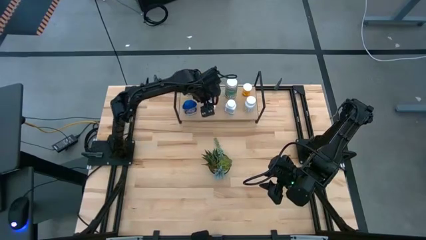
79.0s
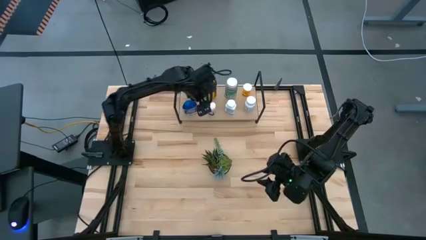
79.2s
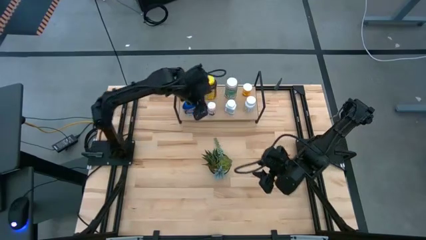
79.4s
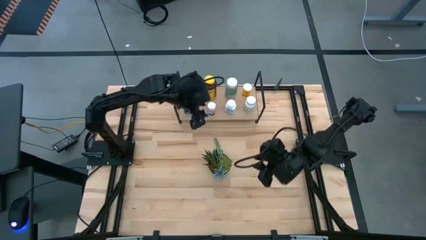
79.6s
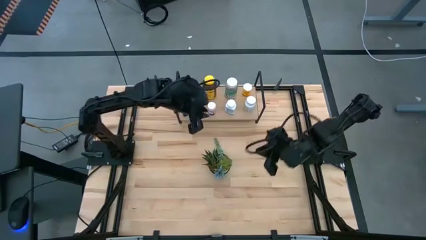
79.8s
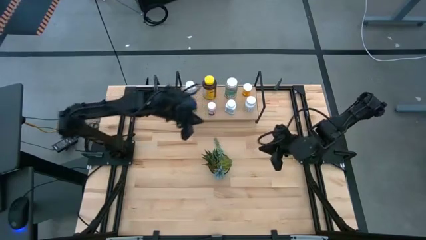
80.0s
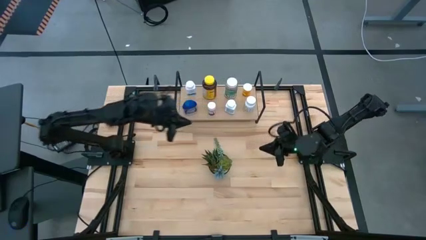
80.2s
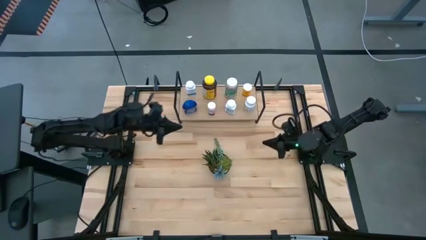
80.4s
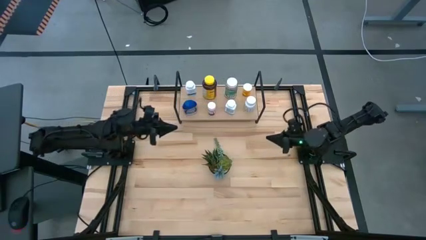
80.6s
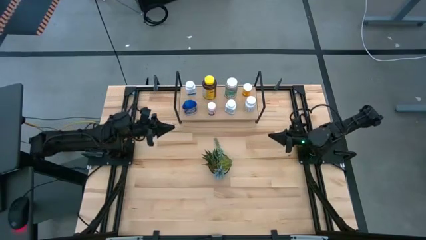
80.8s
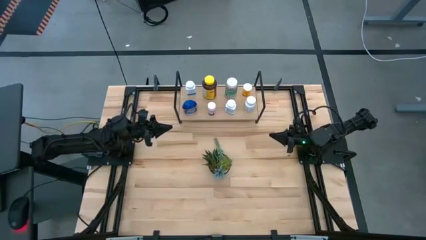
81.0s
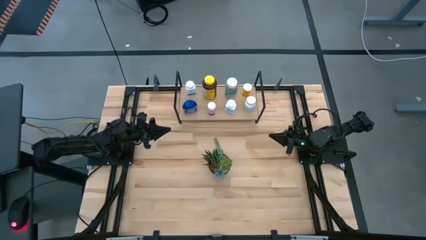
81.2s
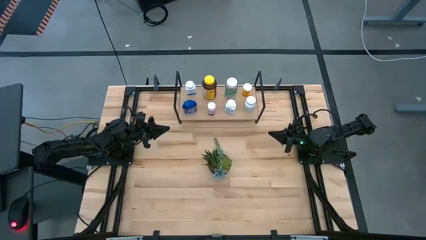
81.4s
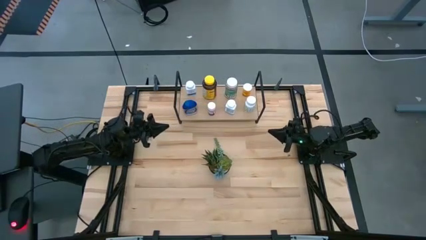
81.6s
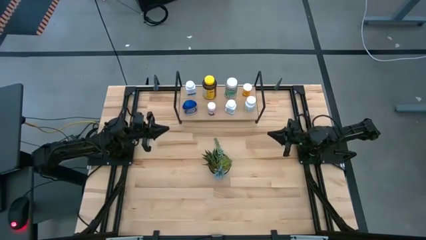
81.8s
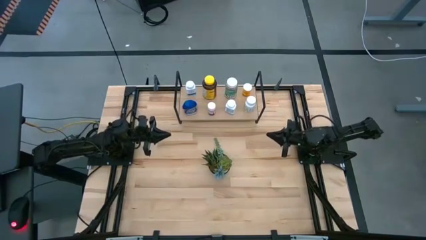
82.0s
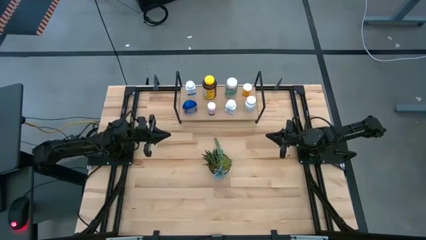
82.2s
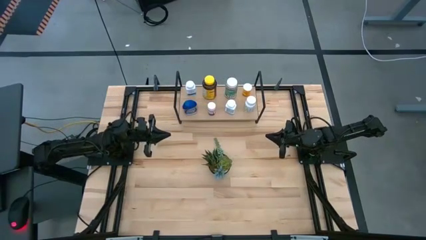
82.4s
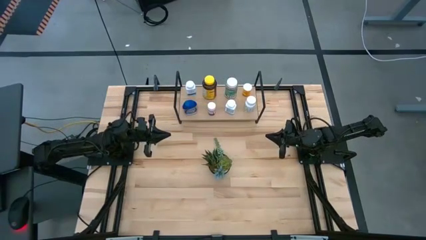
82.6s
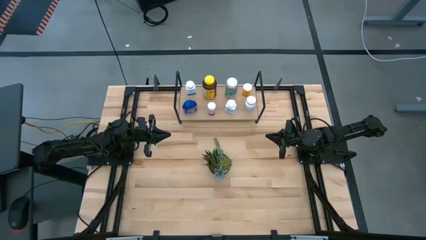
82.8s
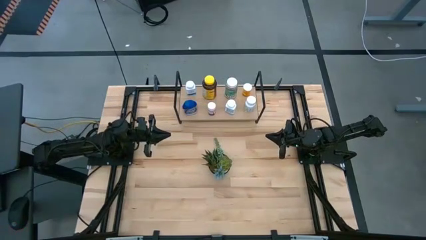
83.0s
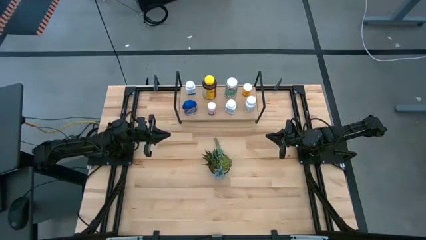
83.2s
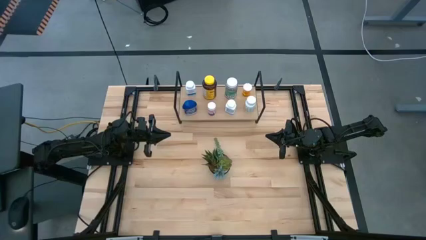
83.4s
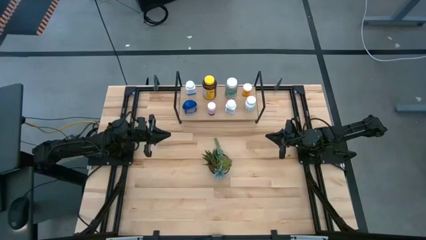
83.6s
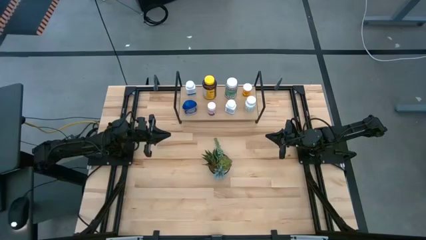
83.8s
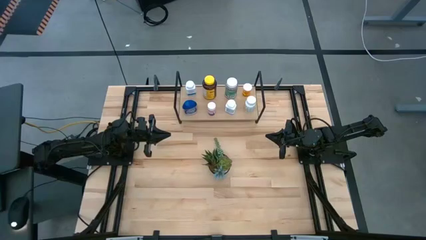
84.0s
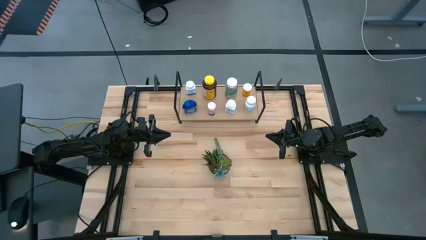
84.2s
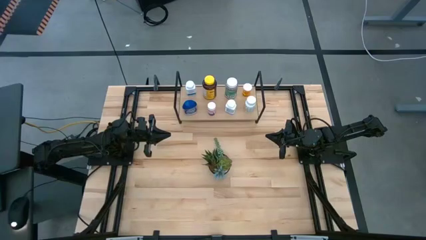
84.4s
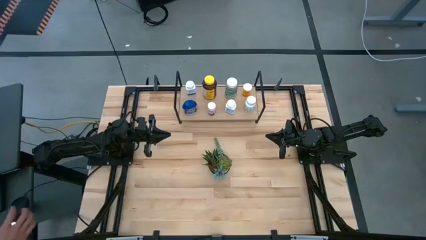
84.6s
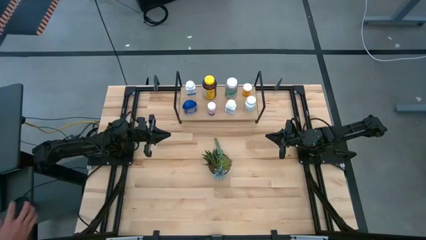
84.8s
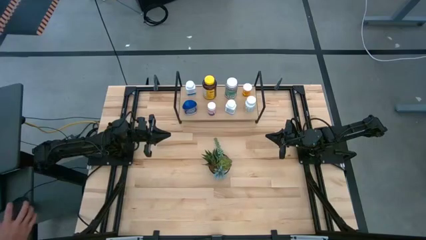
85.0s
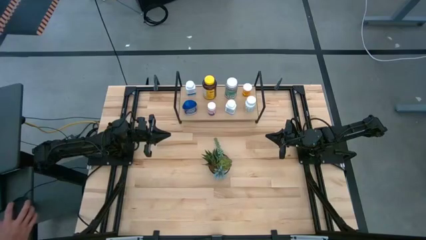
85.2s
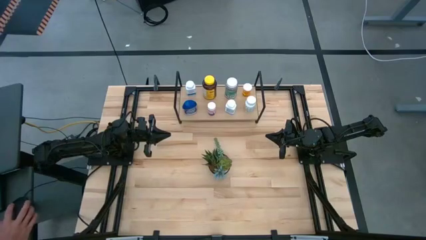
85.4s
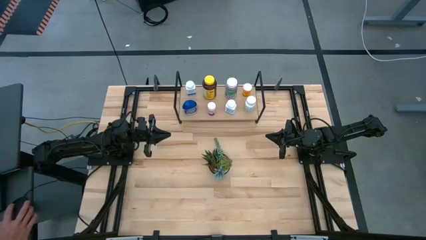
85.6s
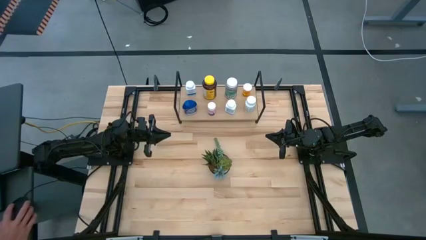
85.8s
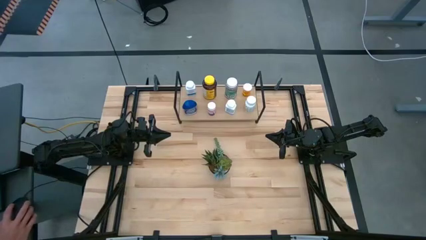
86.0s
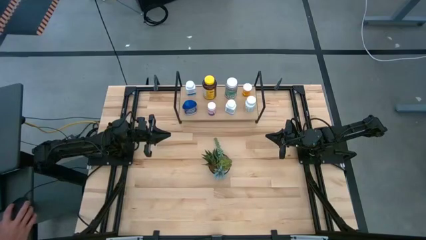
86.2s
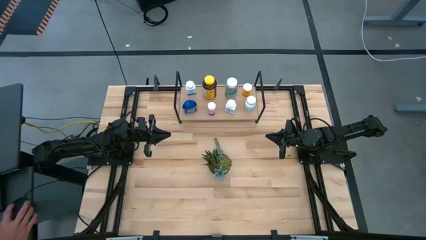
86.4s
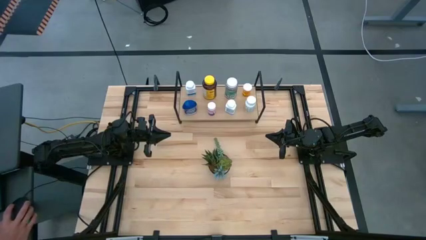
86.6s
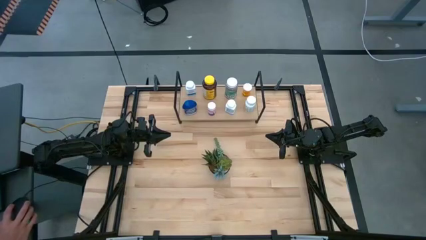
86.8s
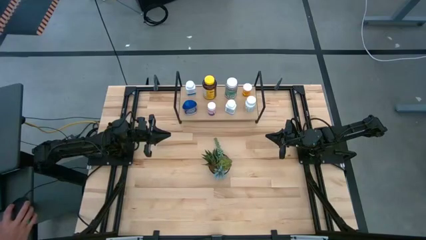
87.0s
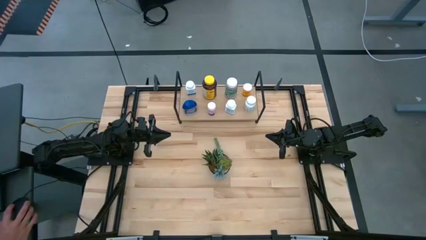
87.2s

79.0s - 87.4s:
Task: Pick and place medicine bottles onto shelf by color
Return to Home Position

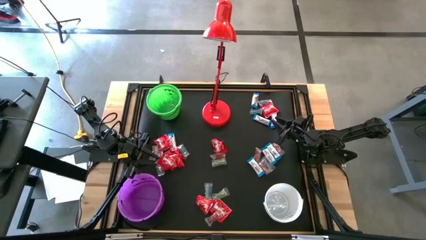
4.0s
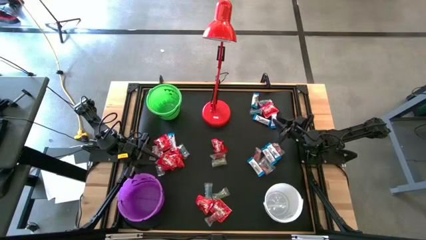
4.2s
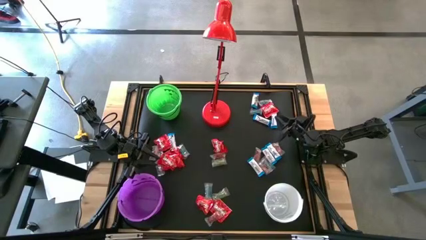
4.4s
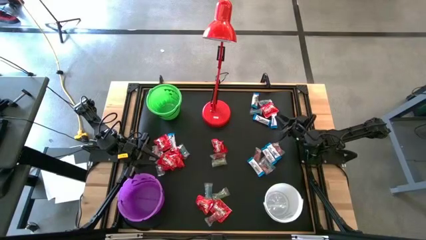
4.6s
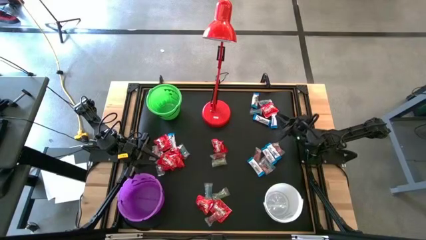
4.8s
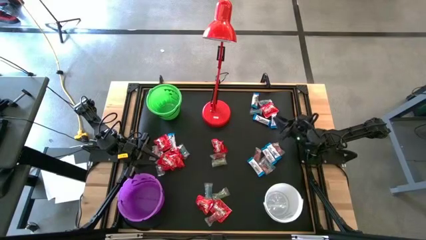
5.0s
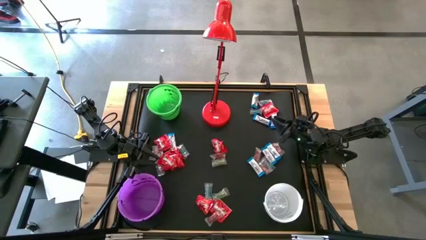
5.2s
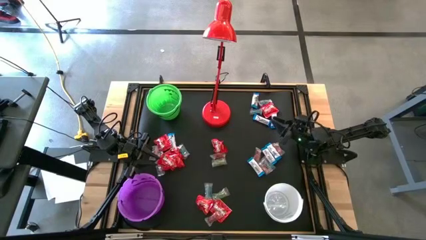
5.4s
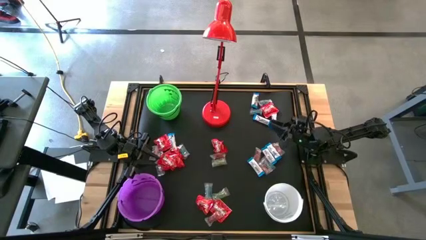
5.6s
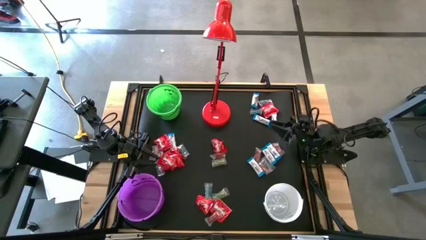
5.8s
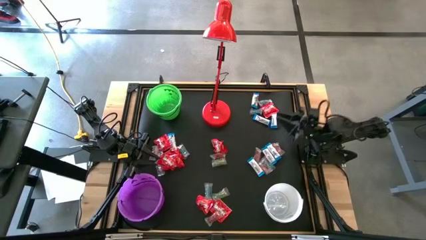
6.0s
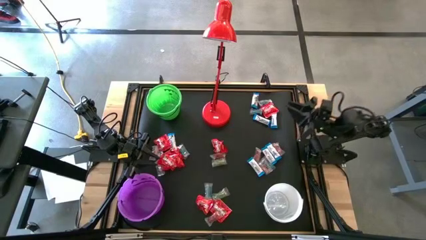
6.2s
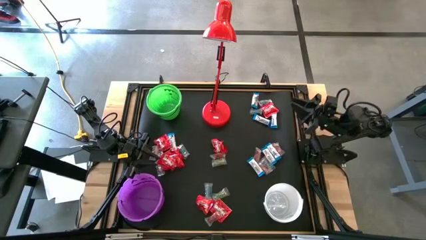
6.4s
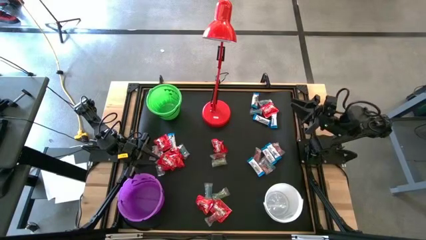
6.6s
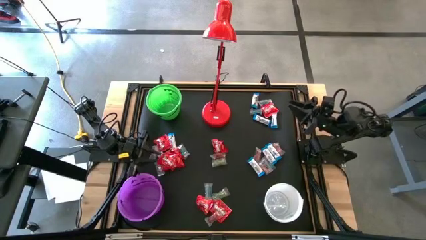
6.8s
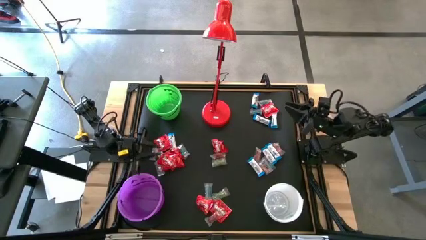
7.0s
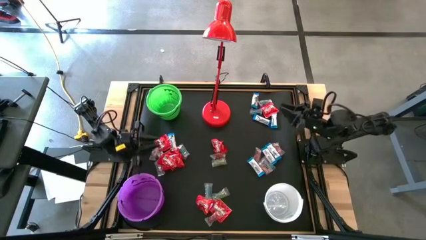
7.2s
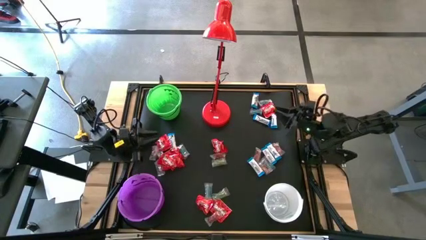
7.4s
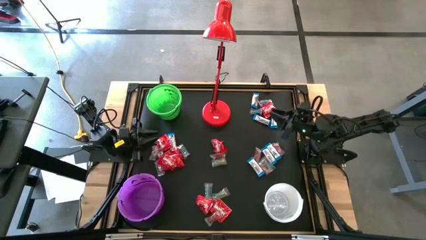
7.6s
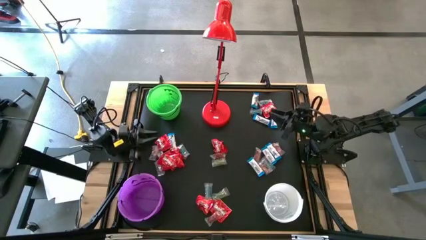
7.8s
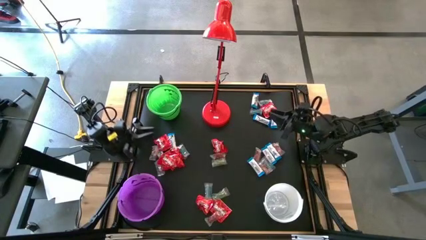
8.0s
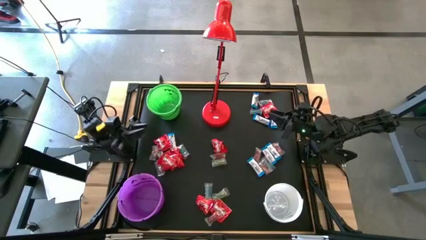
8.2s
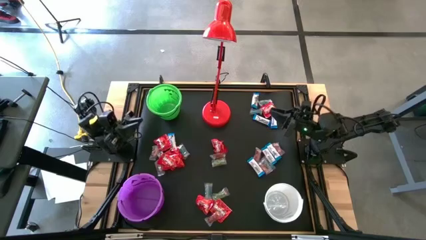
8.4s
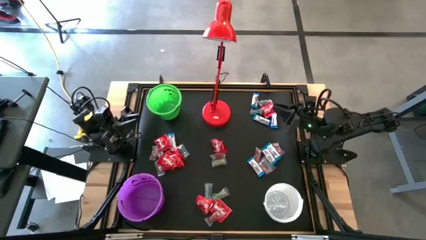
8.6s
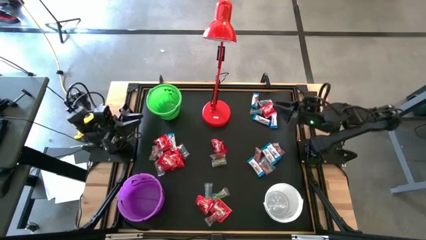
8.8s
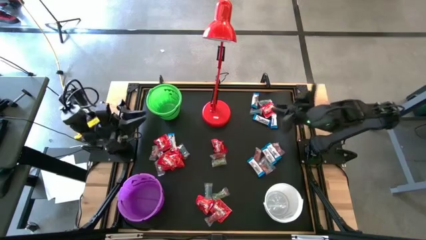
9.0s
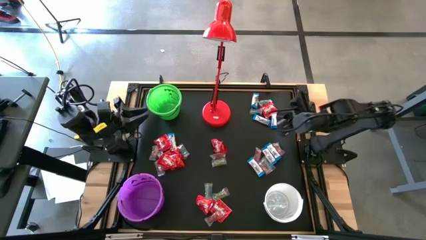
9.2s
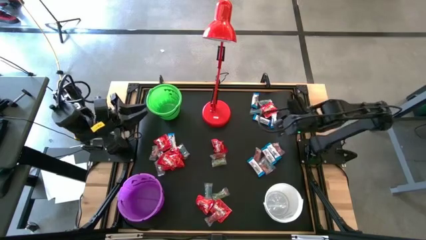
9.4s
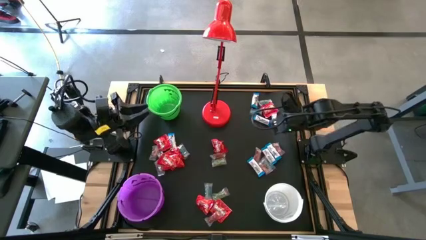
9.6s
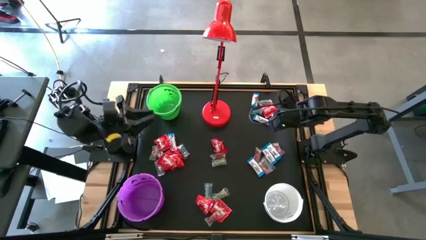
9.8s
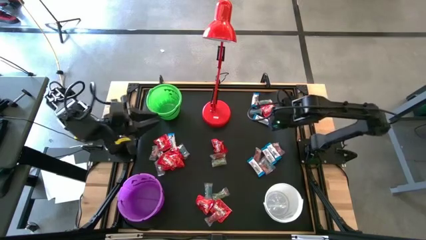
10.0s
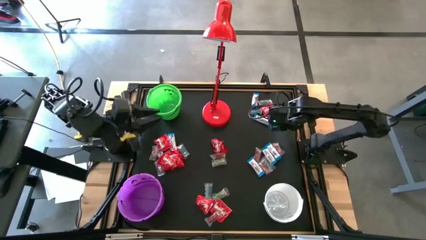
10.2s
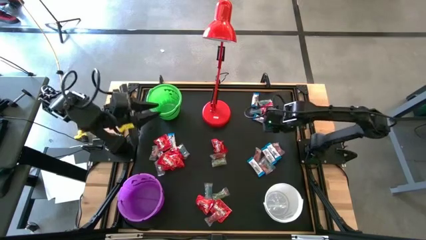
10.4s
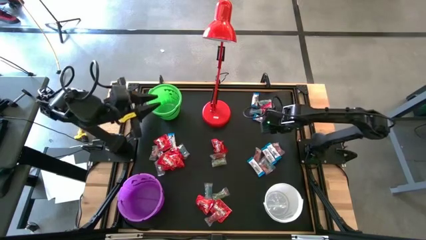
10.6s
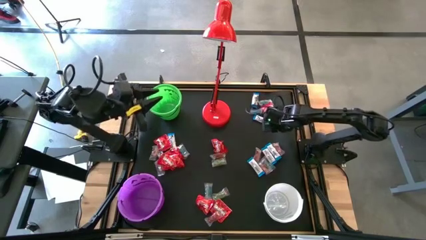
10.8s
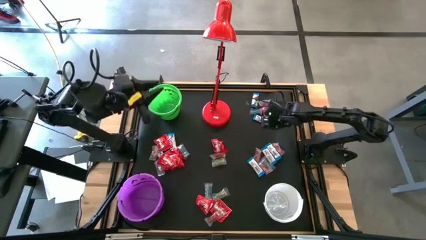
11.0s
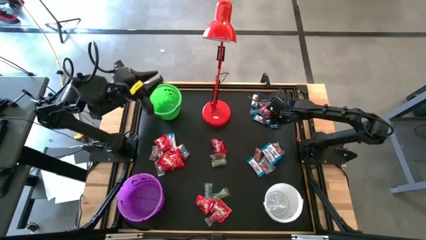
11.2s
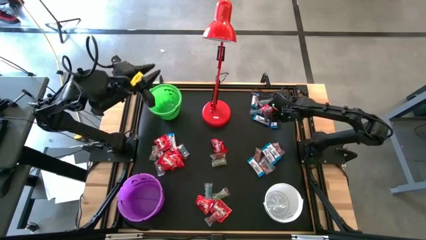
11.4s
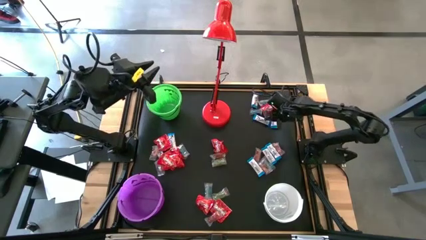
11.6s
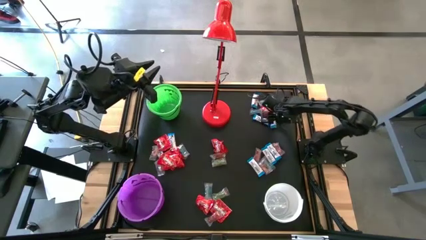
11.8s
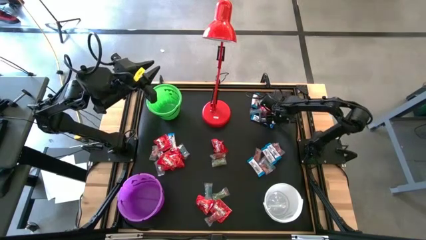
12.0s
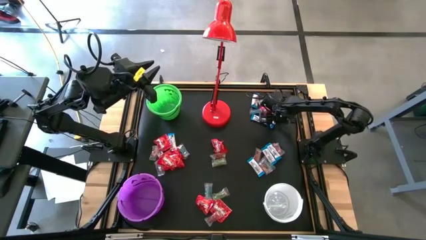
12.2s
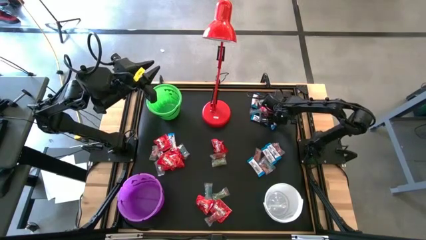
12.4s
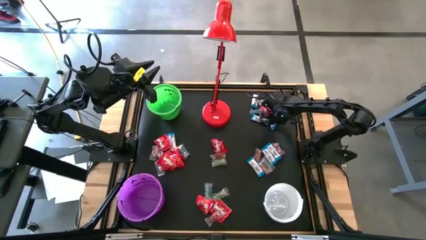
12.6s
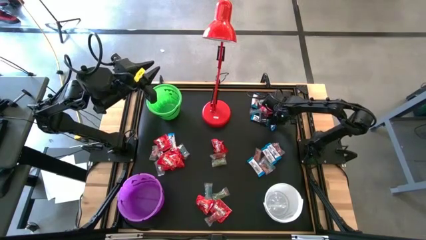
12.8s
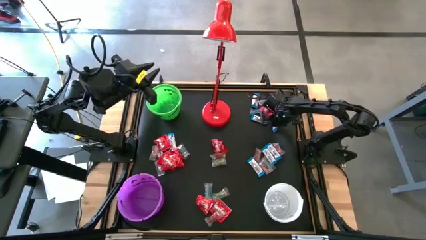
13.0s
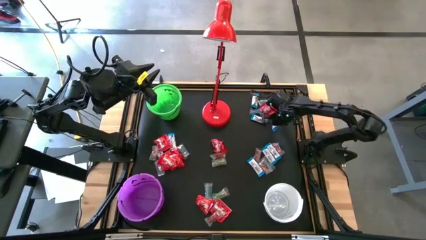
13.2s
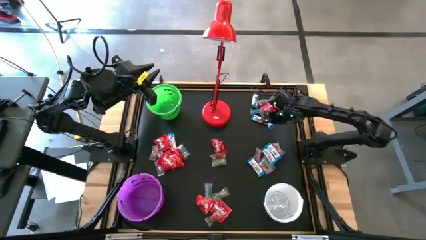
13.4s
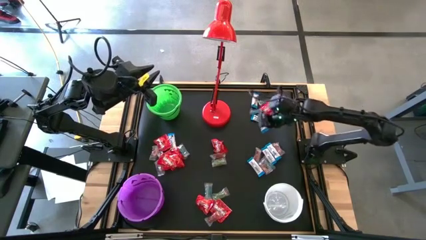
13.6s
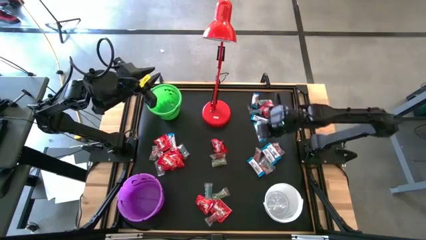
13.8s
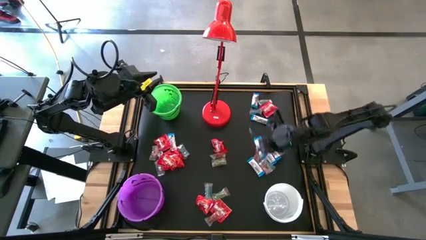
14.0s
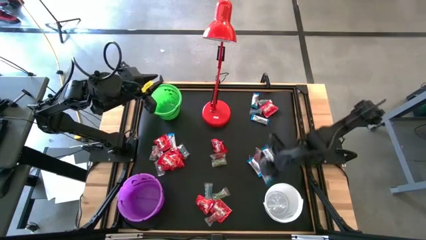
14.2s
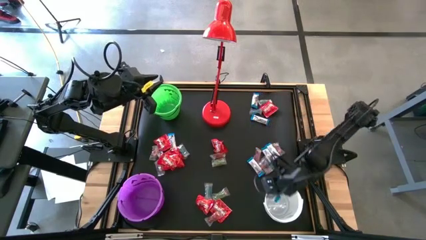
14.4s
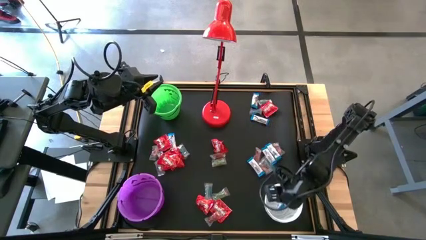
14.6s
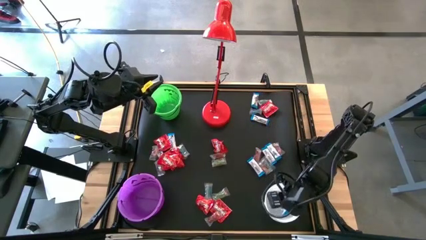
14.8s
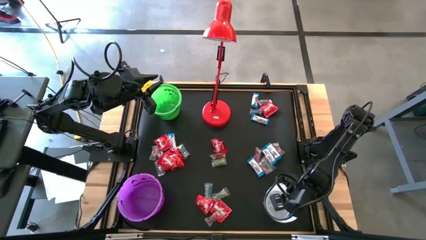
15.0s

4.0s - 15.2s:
Task: Sort candy
Put the white chocolate into the white bucket
